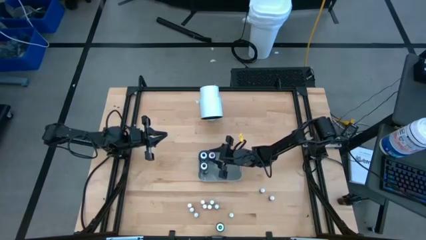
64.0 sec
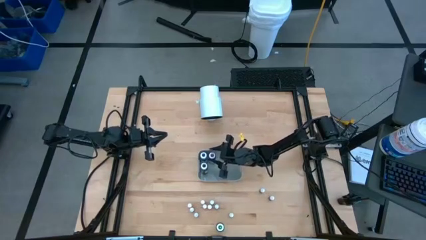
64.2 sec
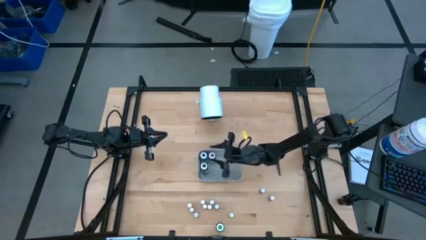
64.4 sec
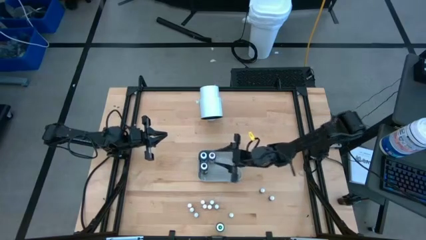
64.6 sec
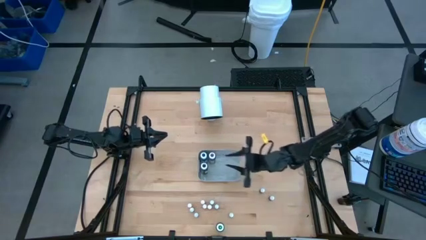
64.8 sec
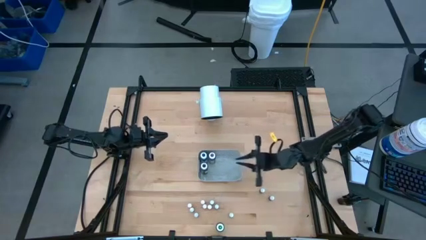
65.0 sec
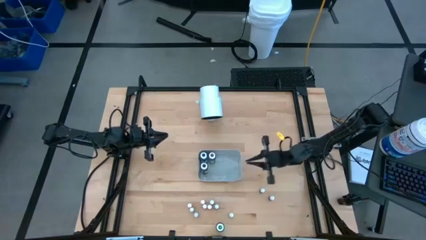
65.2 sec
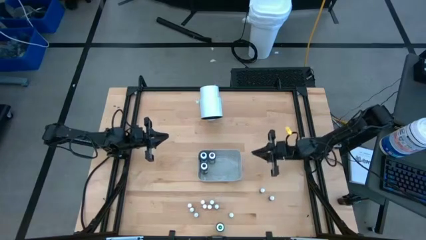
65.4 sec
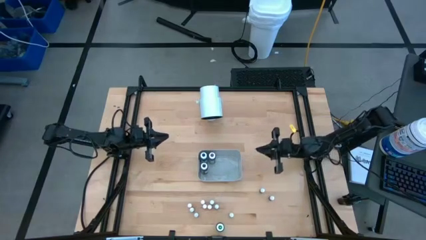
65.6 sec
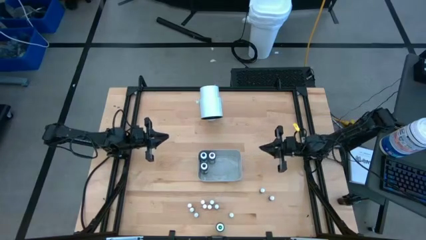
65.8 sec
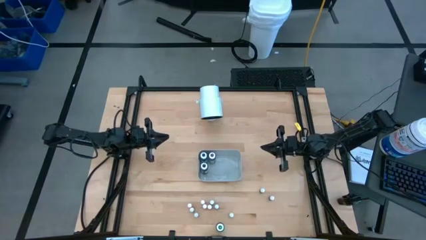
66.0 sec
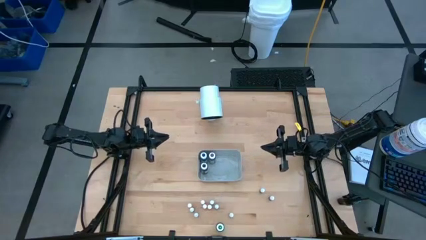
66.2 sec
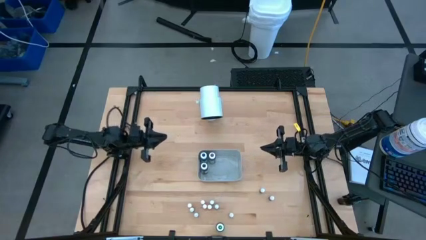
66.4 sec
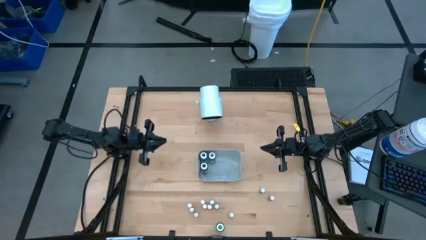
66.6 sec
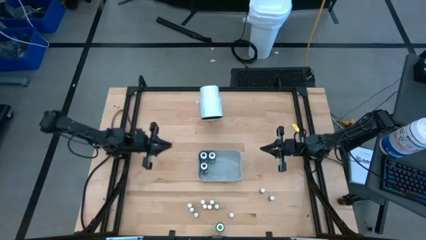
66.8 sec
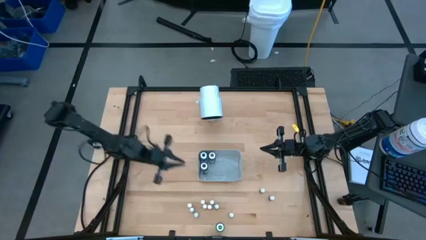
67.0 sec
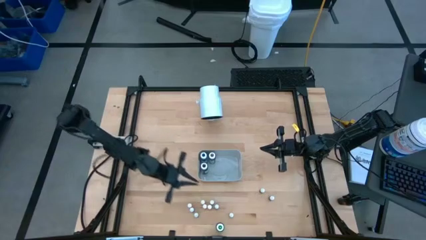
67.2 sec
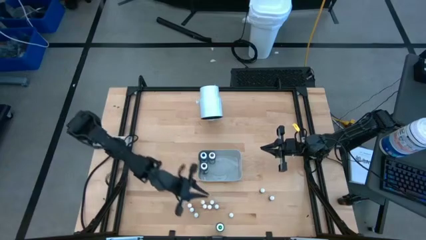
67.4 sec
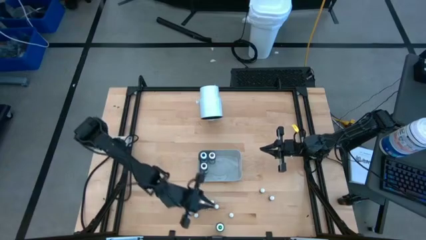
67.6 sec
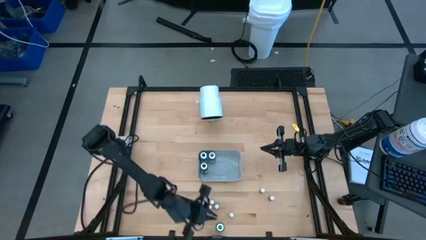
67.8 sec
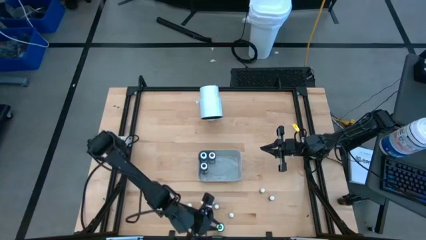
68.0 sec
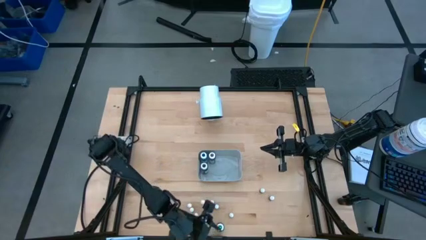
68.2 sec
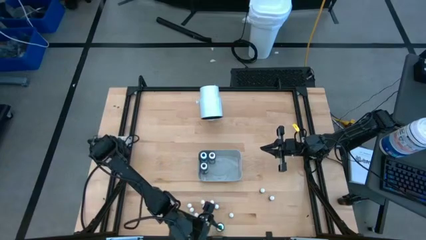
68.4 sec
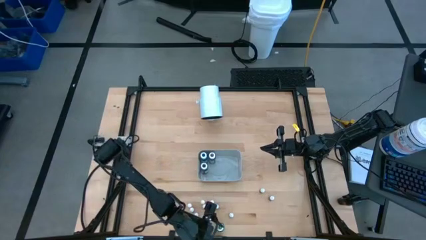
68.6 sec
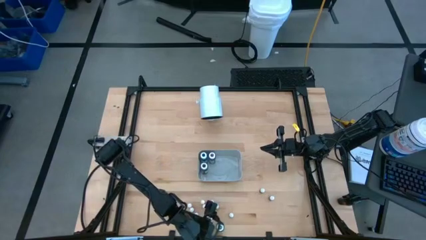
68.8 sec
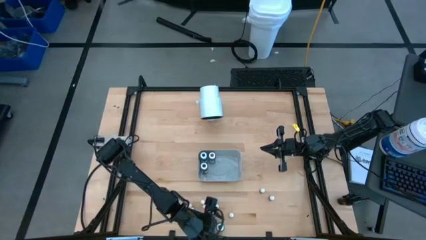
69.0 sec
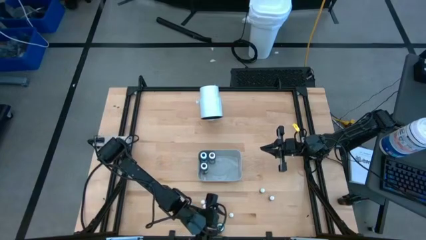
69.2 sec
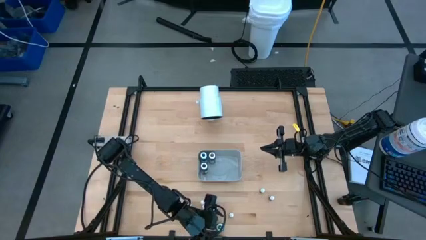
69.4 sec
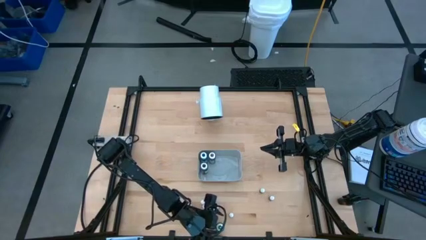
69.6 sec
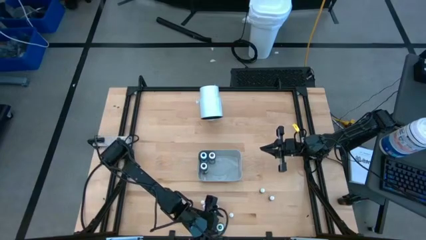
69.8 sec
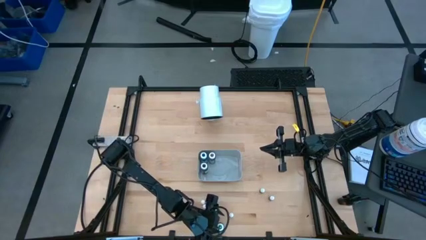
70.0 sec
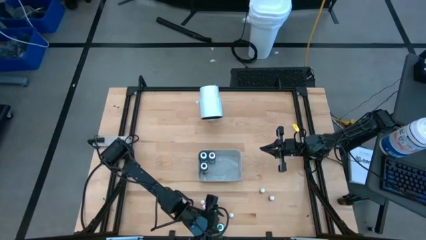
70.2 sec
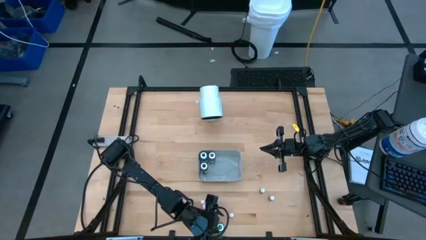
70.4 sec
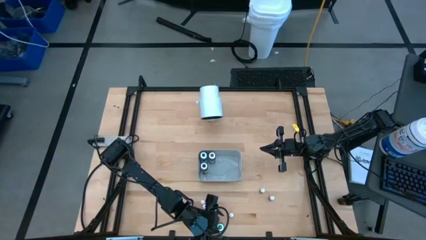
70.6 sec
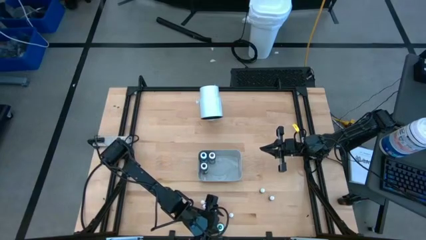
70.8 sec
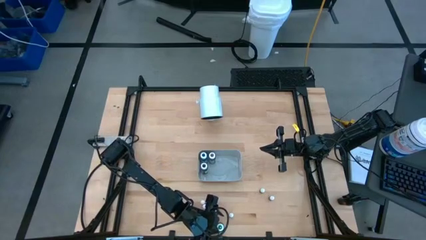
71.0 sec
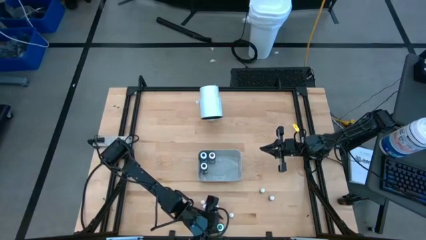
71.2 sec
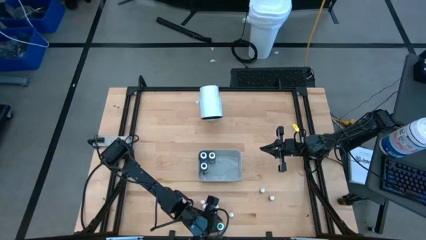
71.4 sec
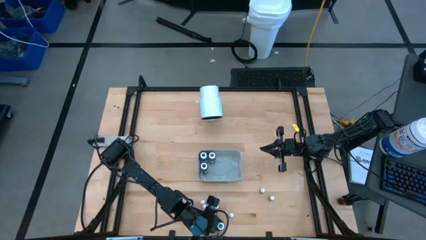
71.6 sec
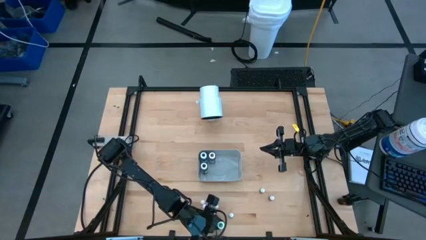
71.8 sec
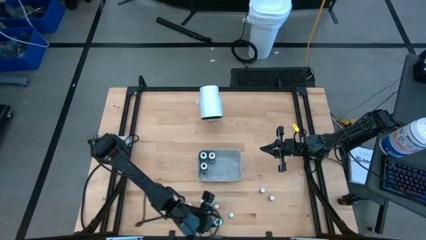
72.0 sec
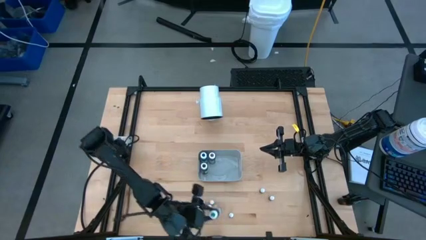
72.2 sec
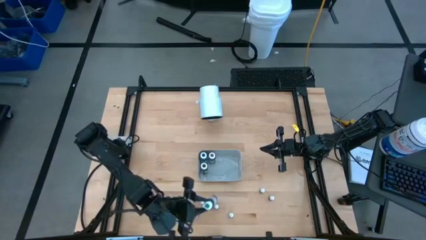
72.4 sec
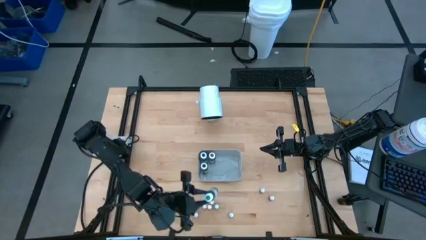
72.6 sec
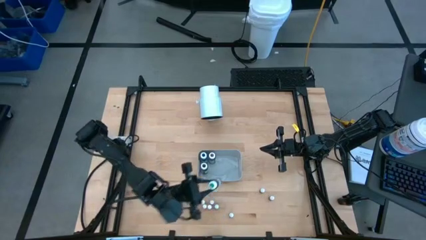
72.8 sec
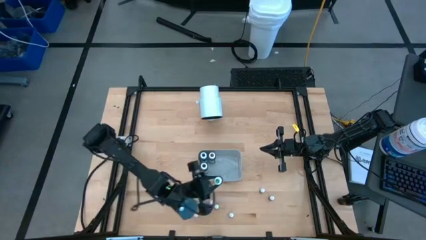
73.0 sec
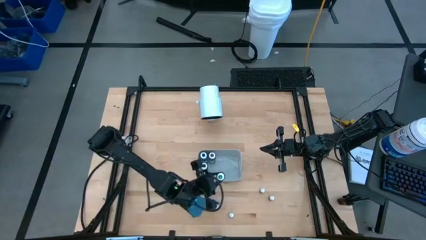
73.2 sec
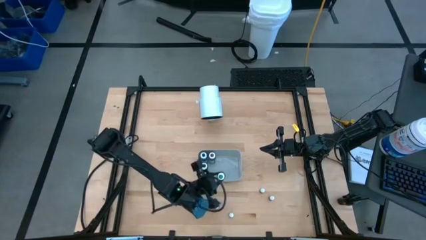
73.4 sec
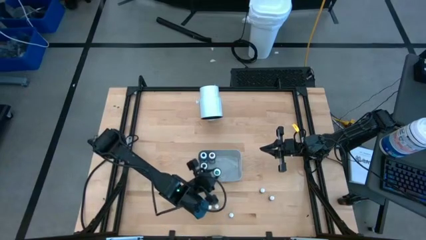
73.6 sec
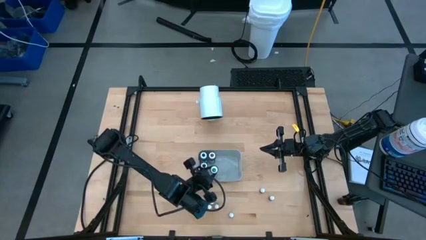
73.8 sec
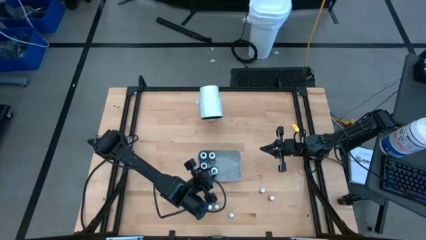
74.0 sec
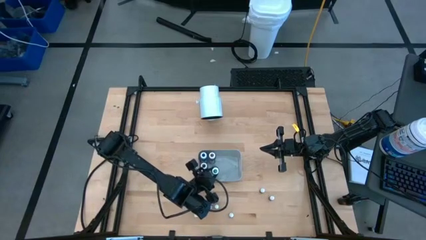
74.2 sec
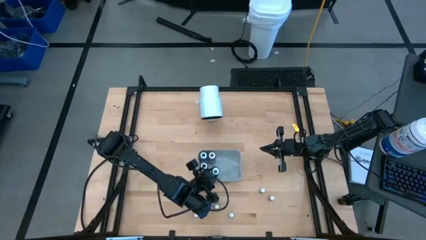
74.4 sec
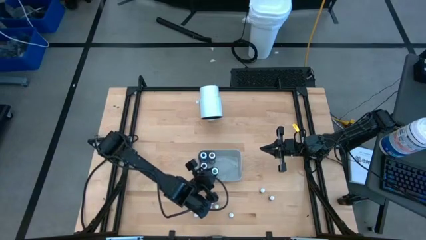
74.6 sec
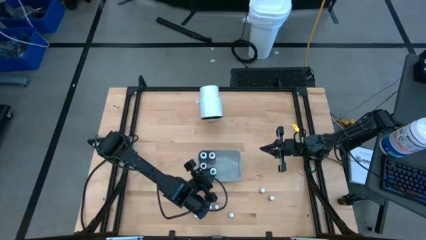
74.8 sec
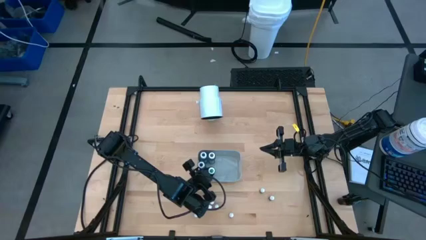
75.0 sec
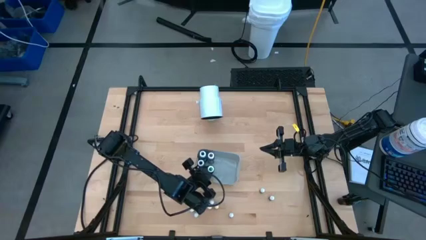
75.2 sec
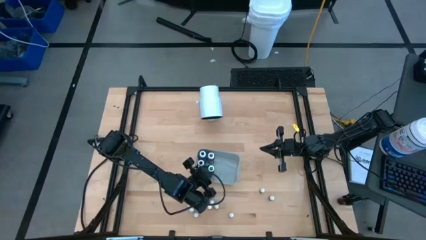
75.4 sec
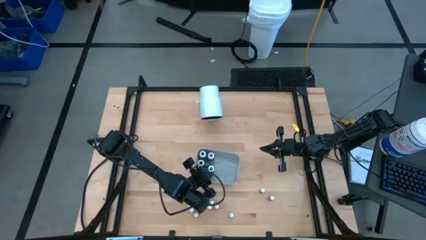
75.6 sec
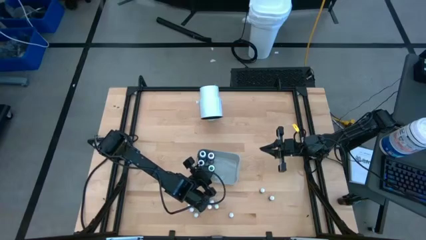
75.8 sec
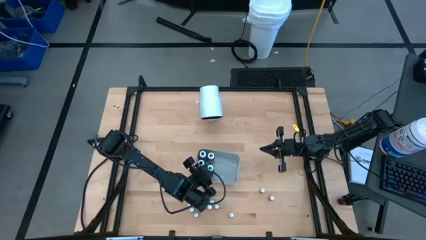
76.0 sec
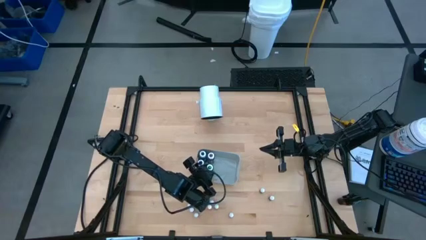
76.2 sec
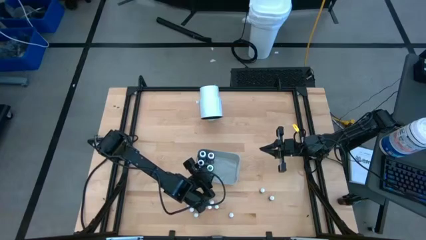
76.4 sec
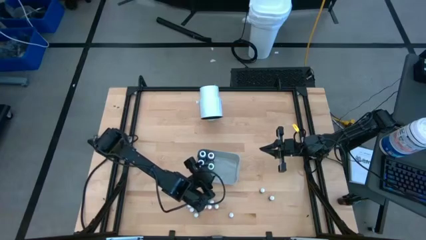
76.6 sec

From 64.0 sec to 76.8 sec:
Task: Pick & Place food coloring
Put the large green food coloring bottle into the gray bin
